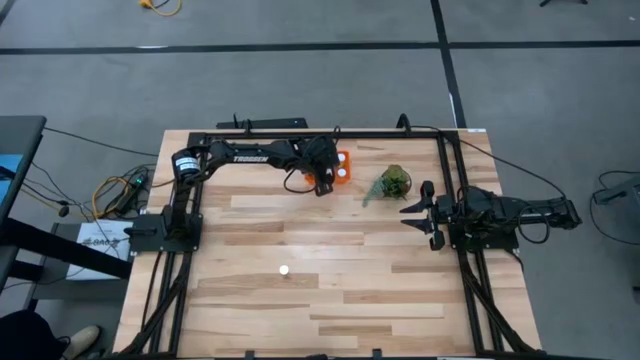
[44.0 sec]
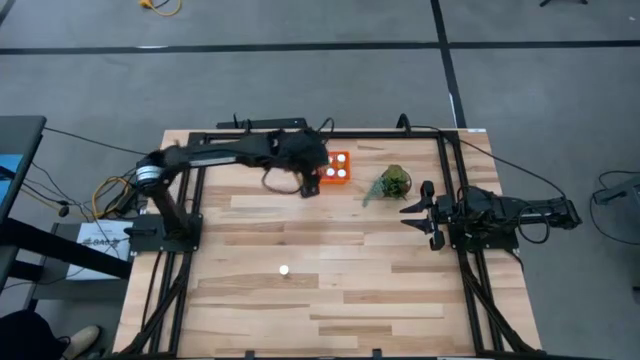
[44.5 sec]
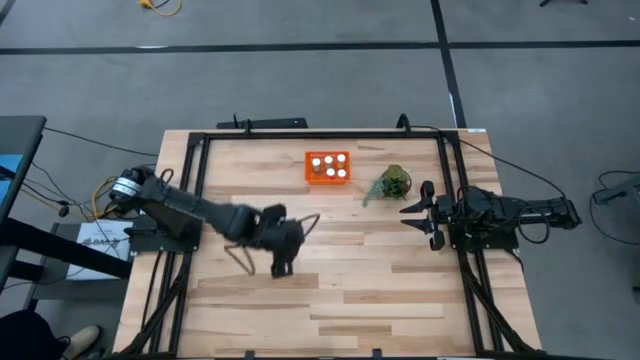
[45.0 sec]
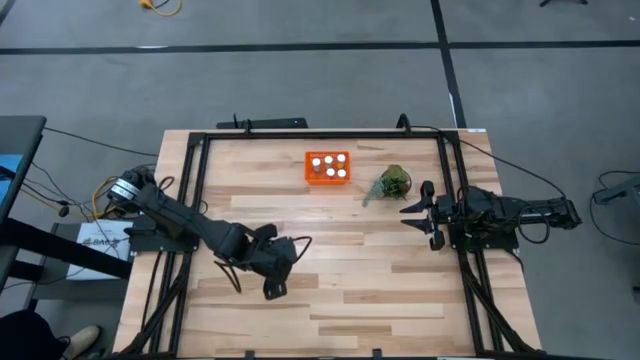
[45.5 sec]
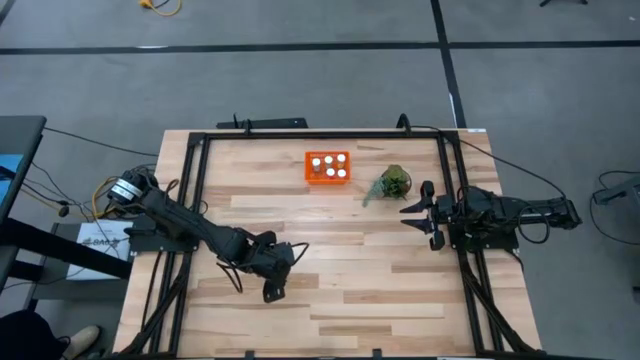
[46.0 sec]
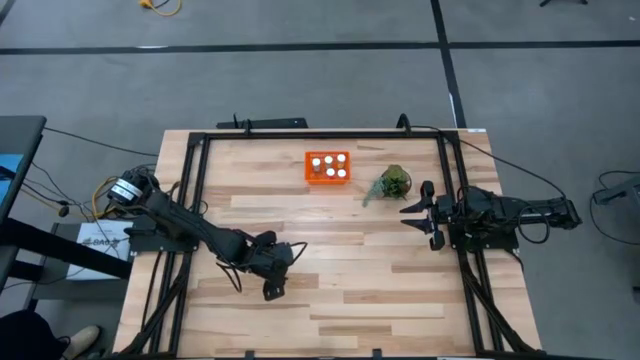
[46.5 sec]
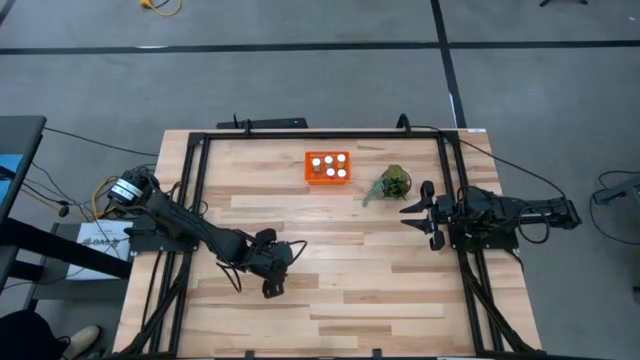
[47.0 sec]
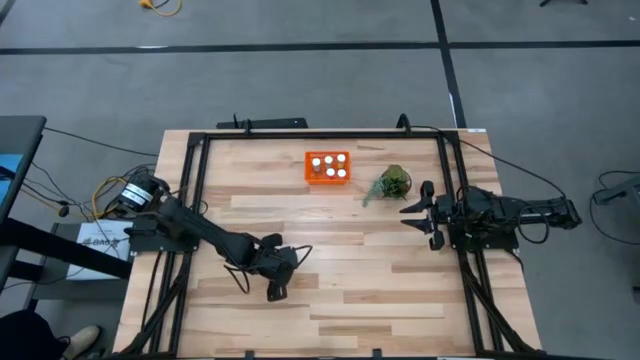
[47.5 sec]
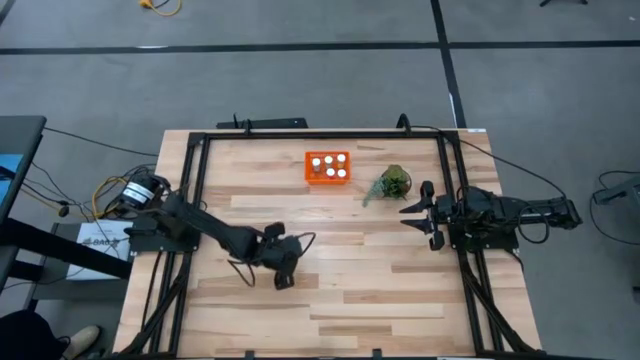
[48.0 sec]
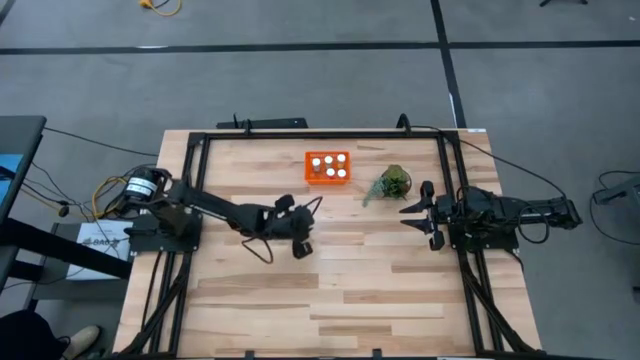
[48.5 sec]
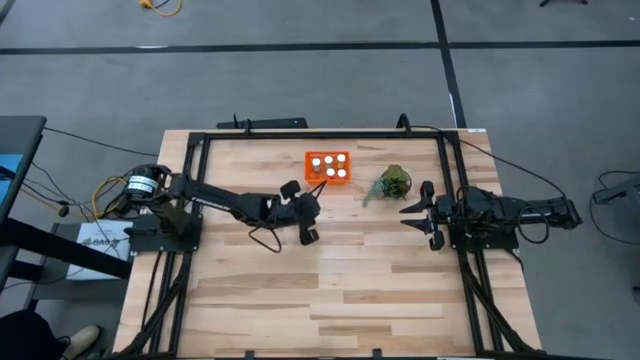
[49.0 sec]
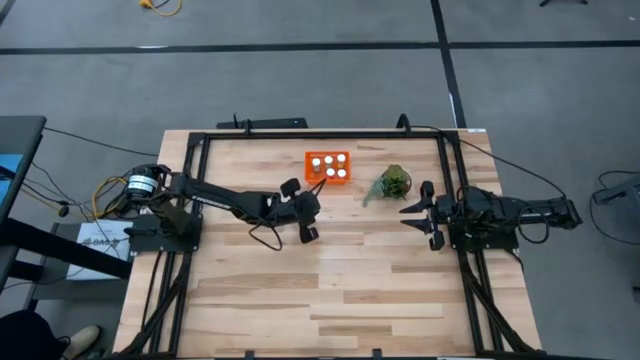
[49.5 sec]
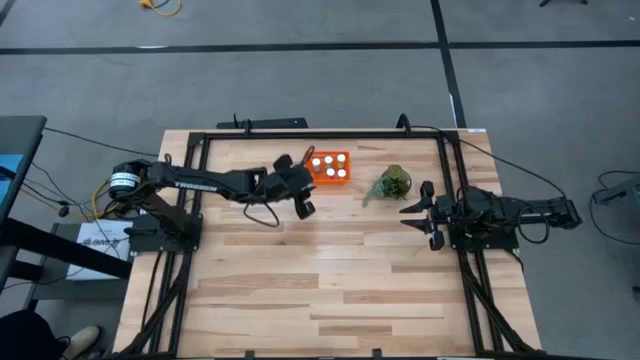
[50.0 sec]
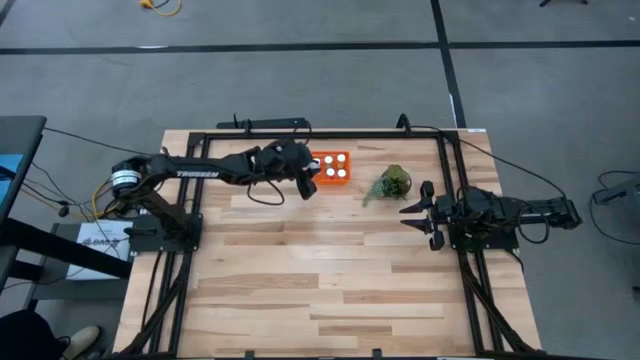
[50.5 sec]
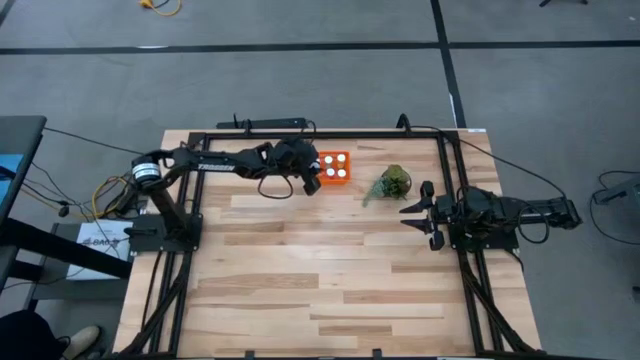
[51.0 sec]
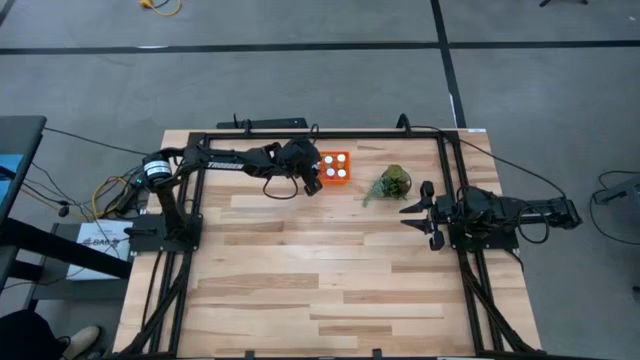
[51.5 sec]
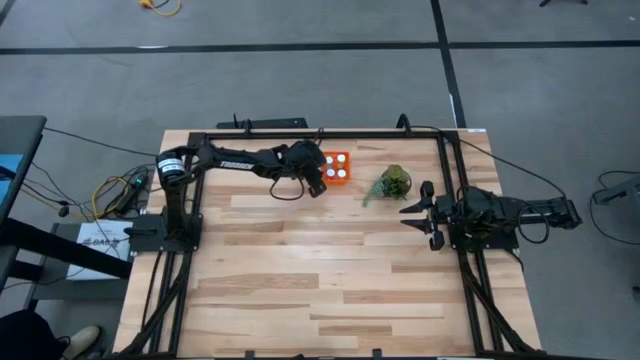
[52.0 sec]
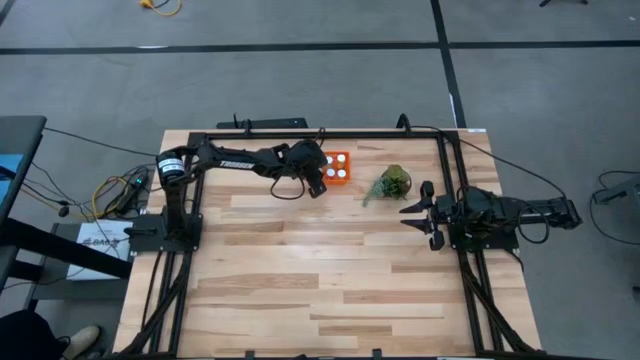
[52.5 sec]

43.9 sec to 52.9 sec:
Task: Pick and place pill bottles into a basket
Put the yellow pill bottle into the orange bin

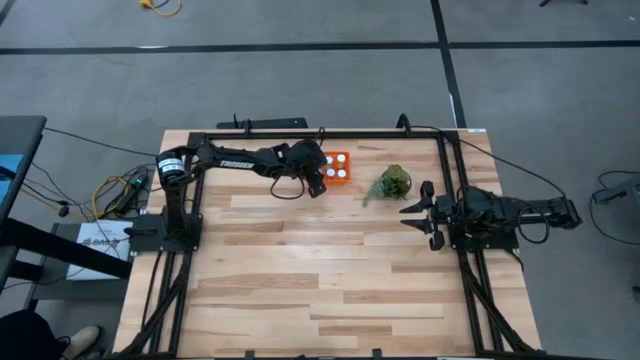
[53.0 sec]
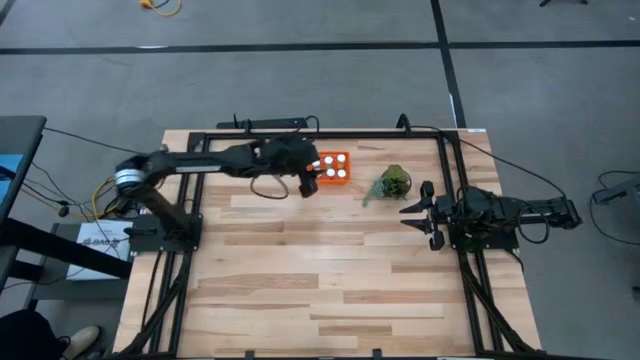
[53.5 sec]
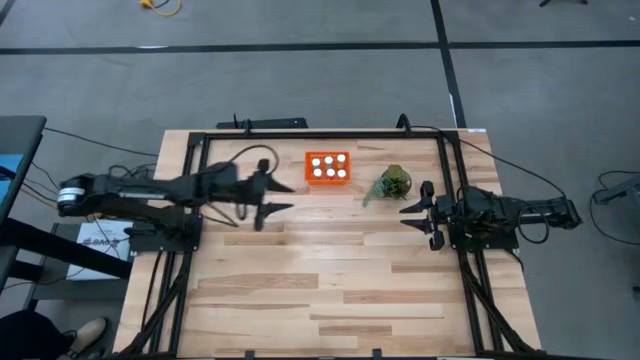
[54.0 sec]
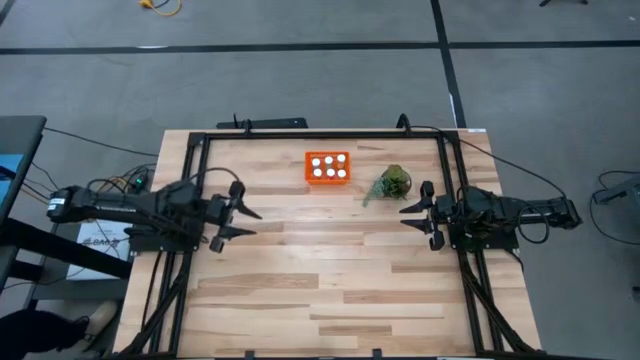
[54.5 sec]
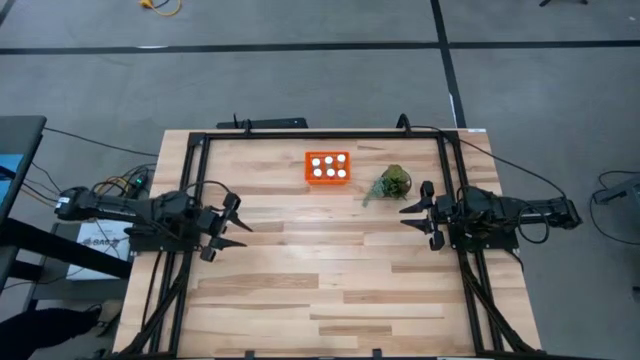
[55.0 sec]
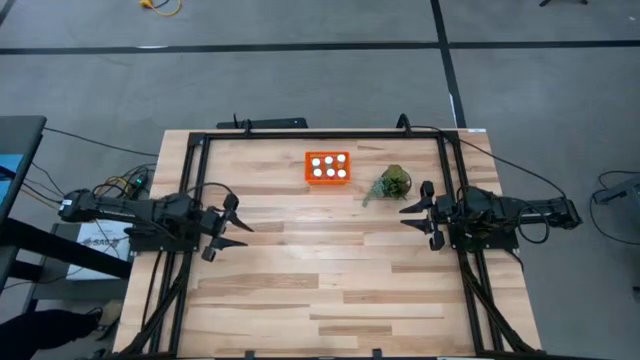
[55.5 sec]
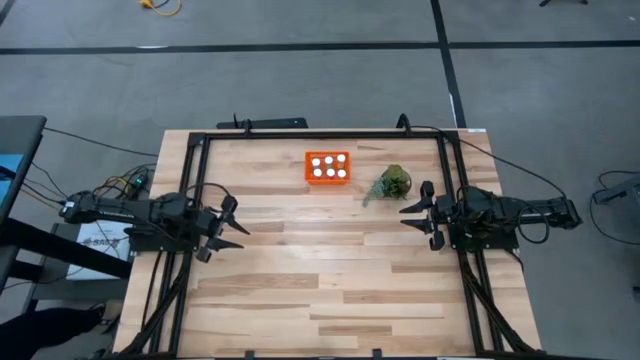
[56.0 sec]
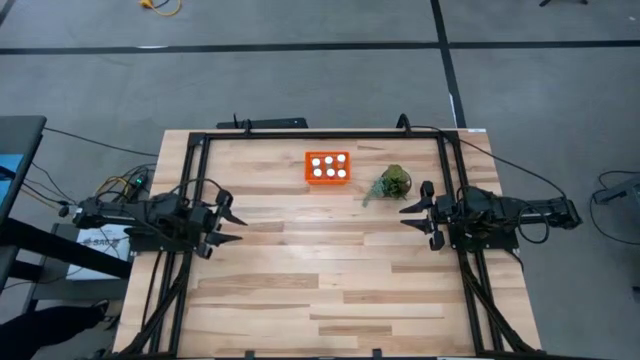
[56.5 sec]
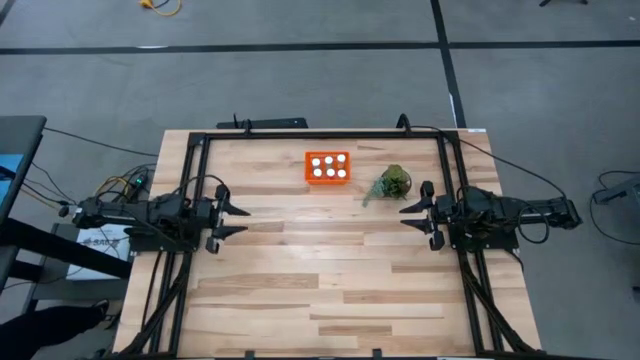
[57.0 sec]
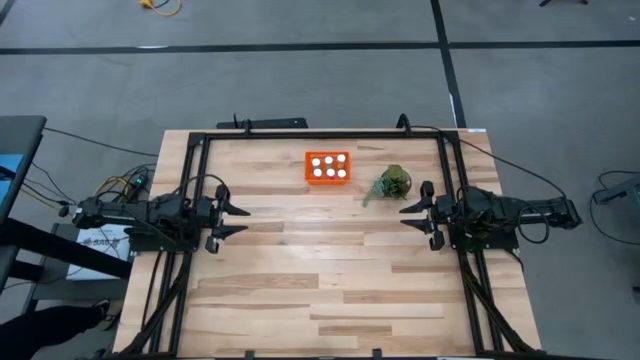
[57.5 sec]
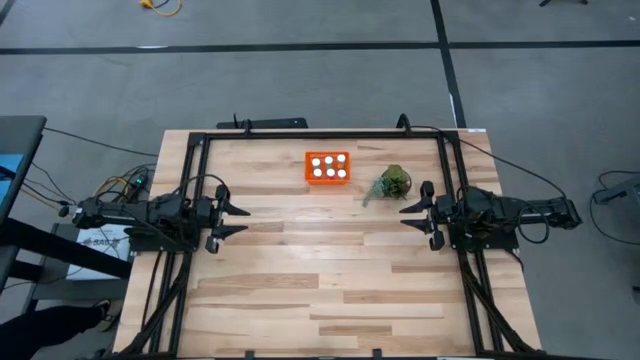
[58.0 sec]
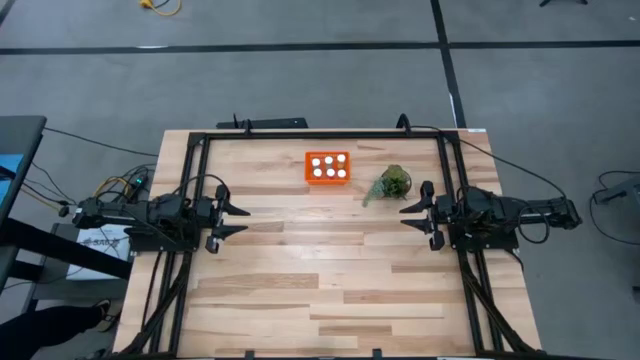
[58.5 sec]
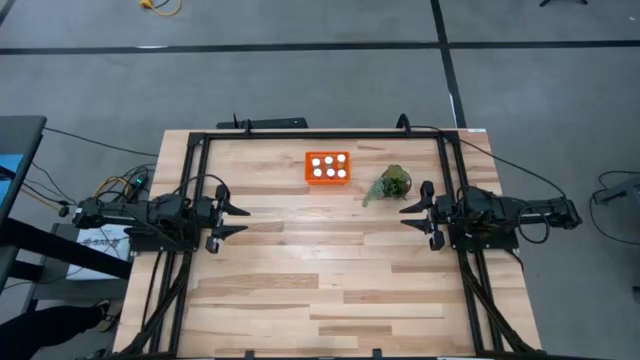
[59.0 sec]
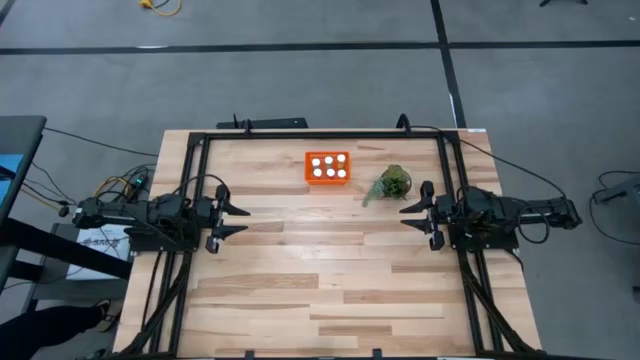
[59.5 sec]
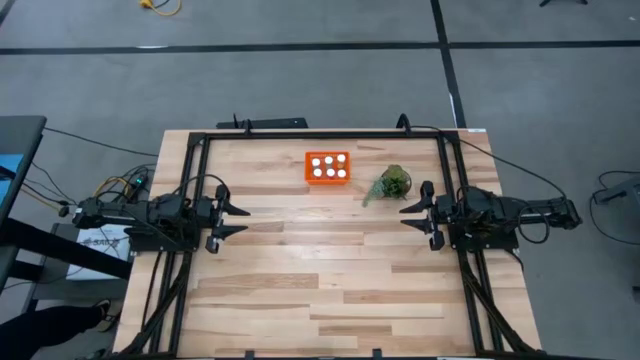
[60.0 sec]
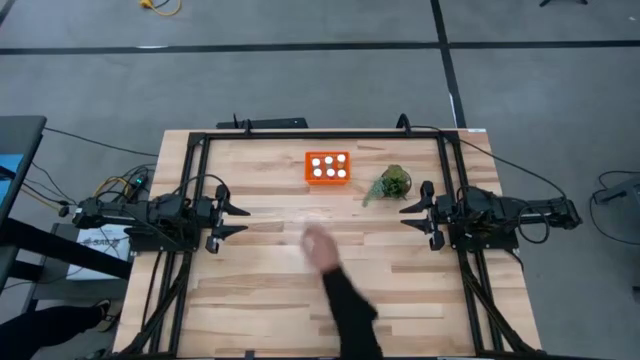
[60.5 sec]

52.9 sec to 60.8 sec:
Return to Home Position

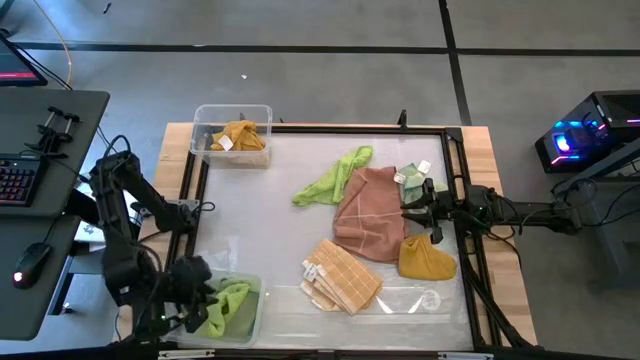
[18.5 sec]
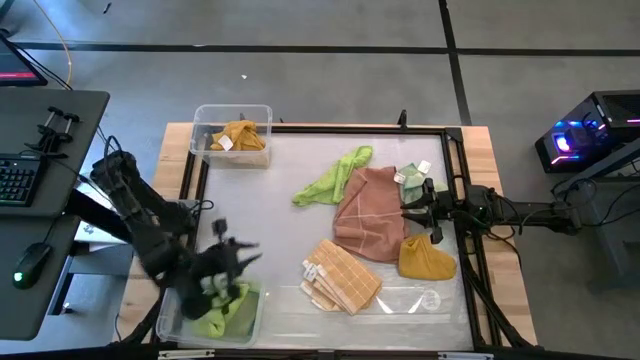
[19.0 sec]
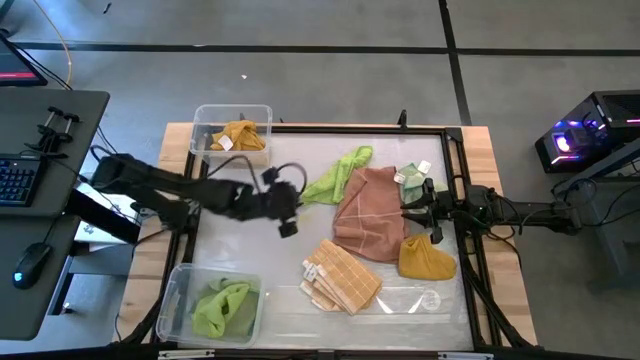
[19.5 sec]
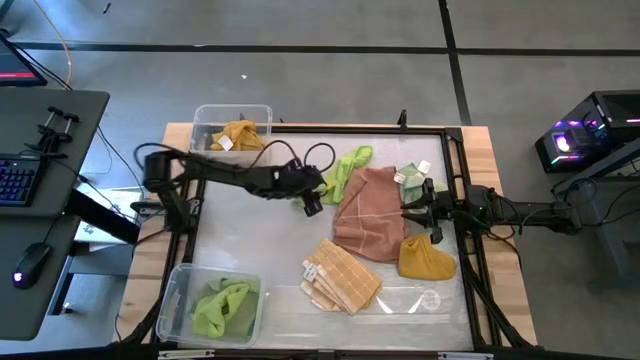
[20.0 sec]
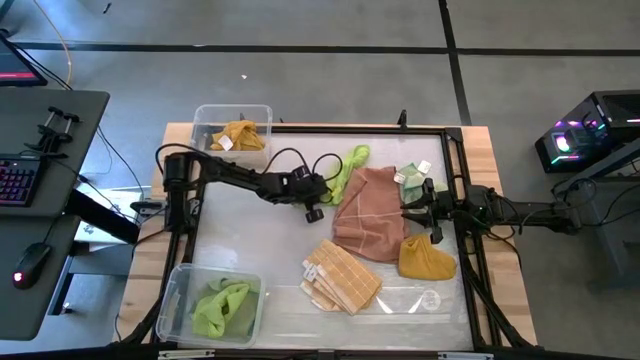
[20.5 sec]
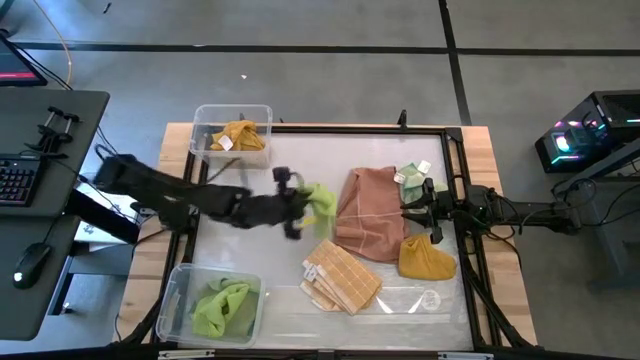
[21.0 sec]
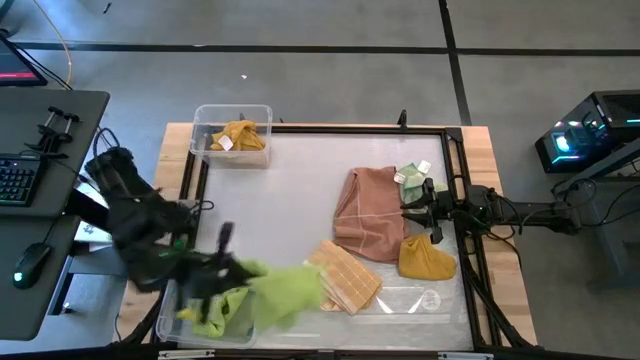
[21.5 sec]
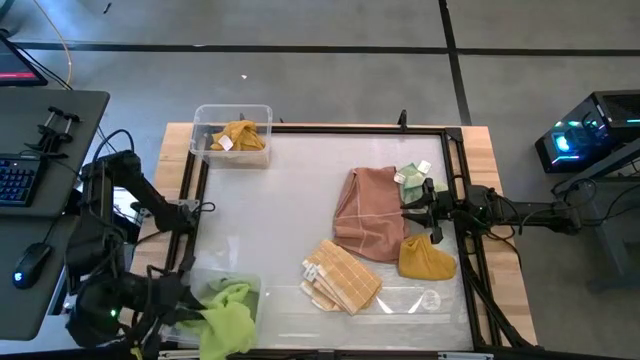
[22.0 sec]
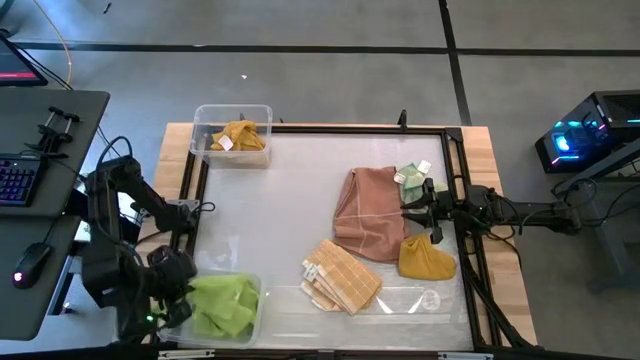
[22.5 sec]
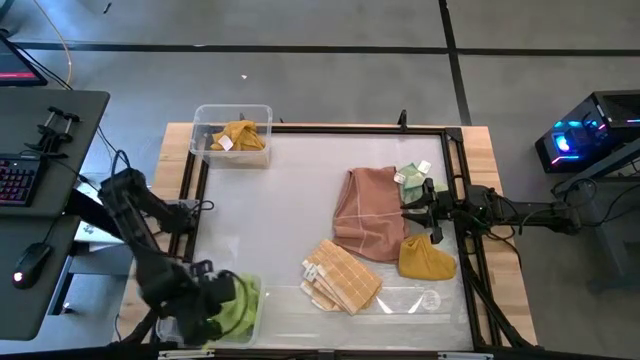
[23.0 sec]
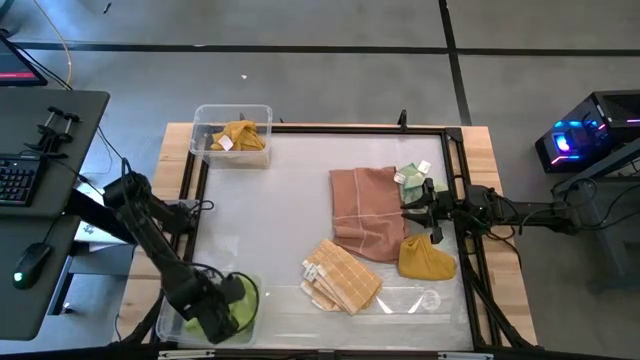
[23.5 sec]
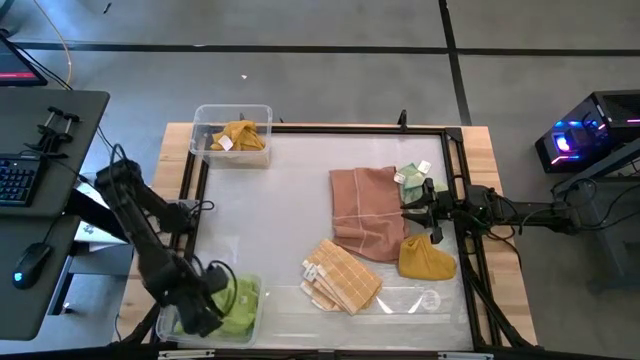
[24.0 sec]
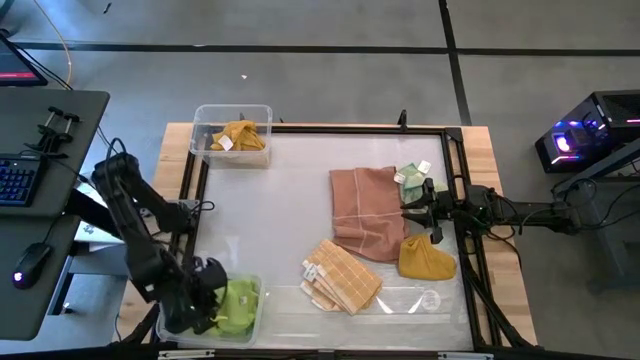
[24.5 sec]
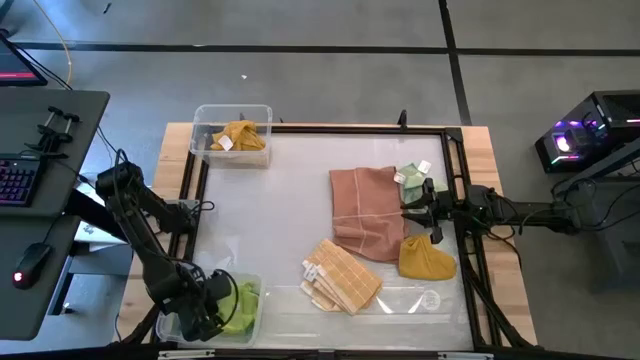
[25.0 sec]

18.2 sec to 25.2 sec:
Task: Sort towels by color in basket
Put the light green towel into the bottom transparent bin
